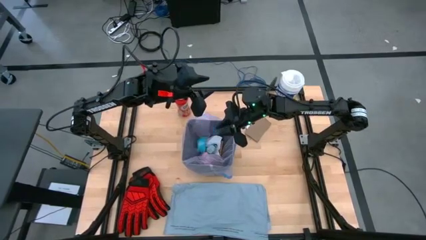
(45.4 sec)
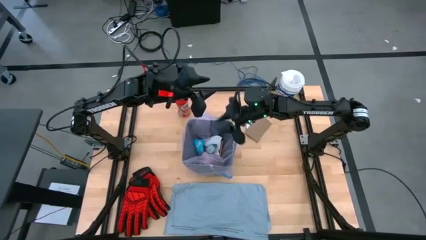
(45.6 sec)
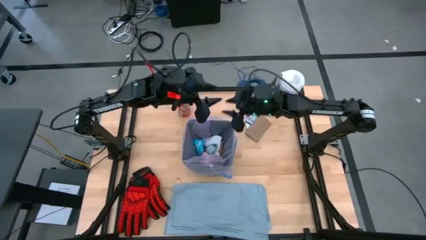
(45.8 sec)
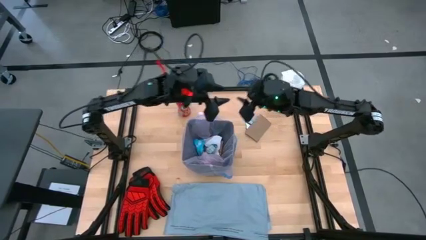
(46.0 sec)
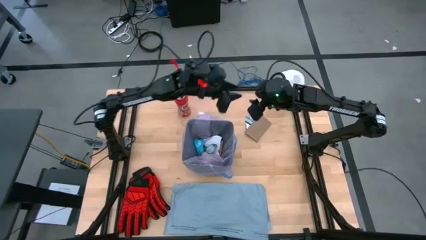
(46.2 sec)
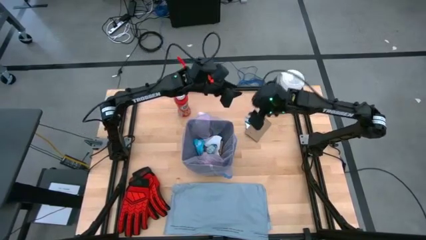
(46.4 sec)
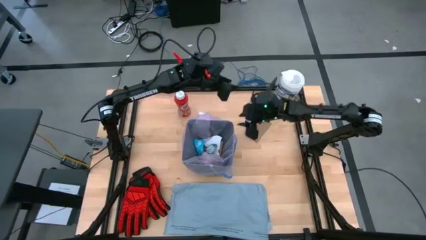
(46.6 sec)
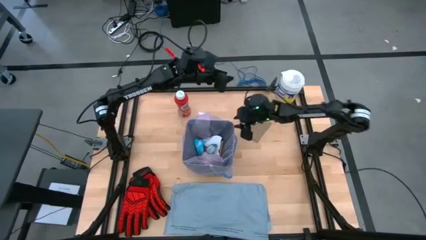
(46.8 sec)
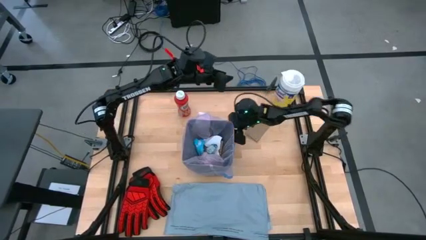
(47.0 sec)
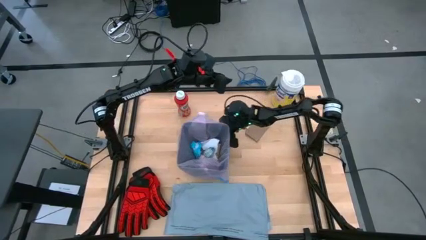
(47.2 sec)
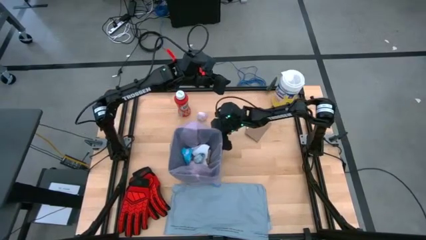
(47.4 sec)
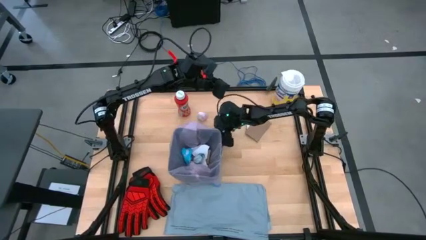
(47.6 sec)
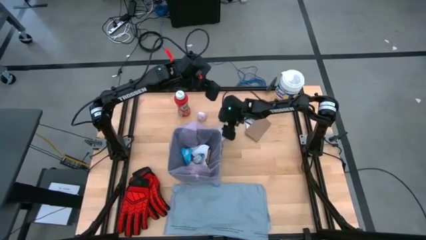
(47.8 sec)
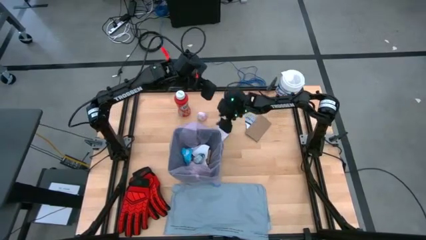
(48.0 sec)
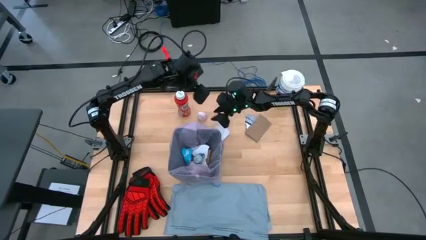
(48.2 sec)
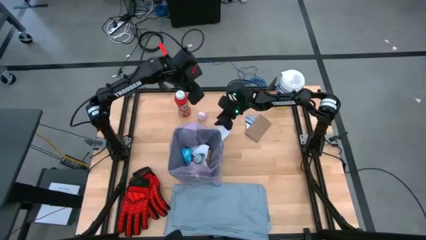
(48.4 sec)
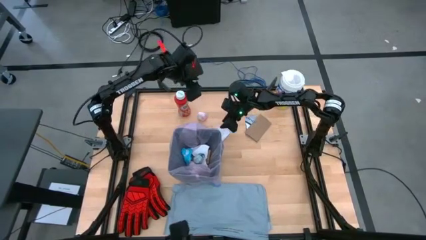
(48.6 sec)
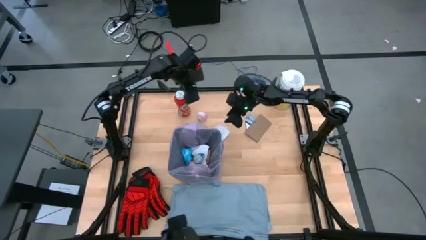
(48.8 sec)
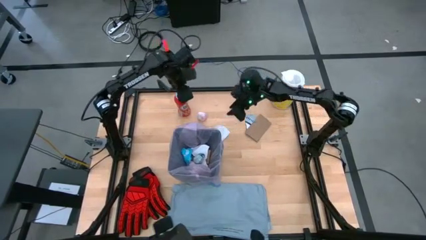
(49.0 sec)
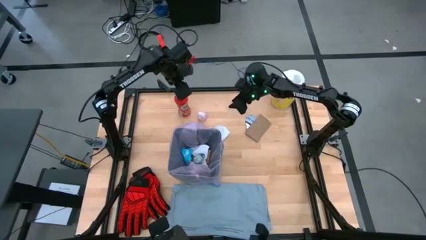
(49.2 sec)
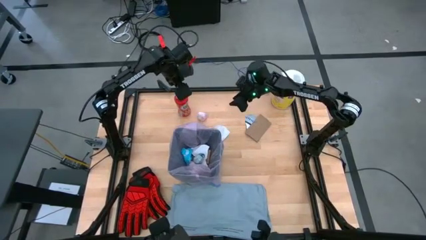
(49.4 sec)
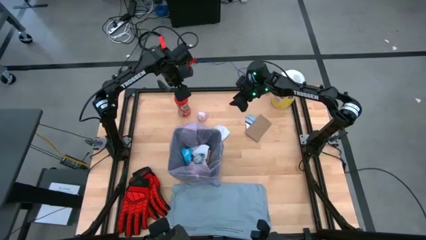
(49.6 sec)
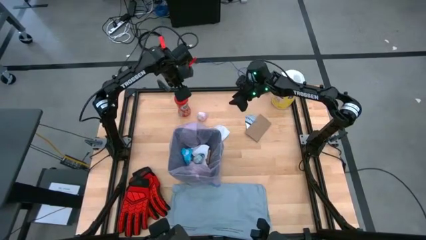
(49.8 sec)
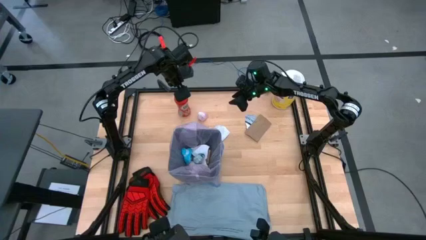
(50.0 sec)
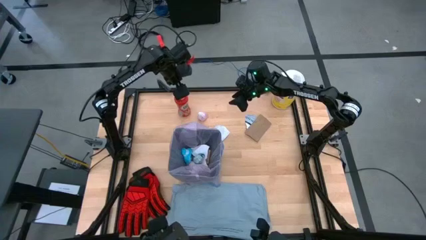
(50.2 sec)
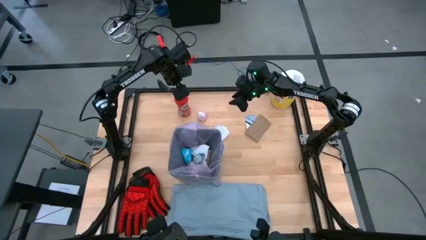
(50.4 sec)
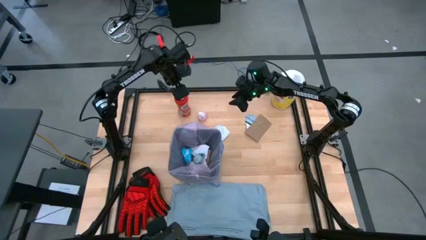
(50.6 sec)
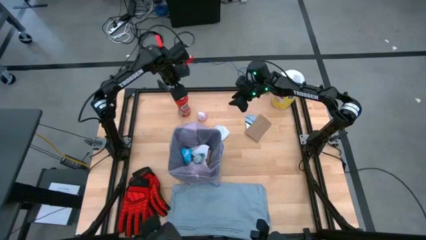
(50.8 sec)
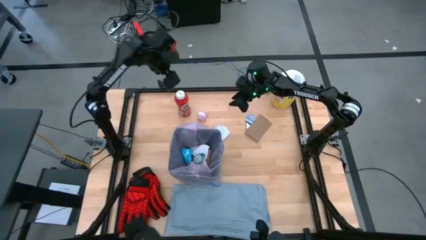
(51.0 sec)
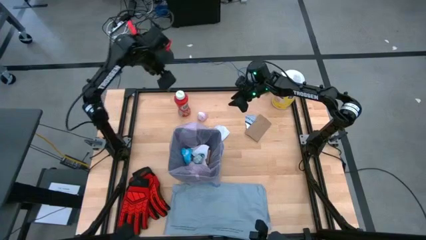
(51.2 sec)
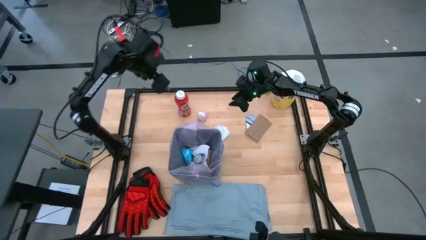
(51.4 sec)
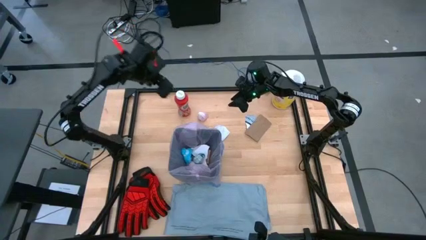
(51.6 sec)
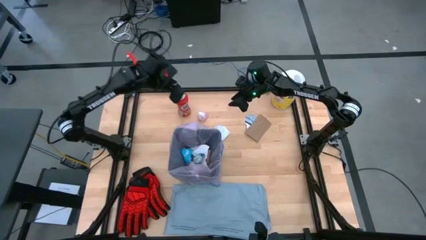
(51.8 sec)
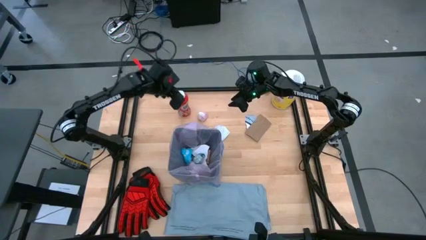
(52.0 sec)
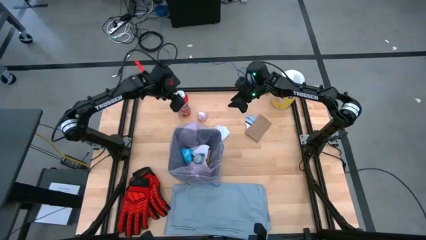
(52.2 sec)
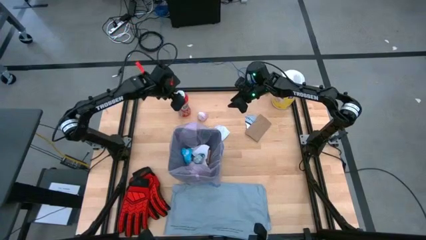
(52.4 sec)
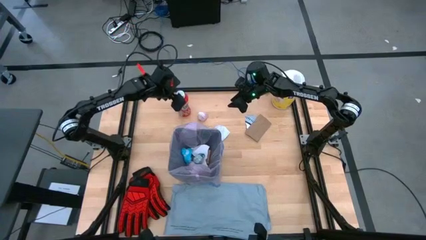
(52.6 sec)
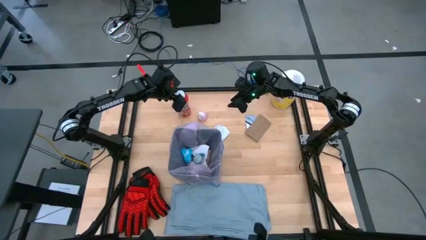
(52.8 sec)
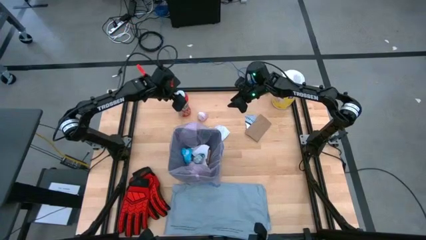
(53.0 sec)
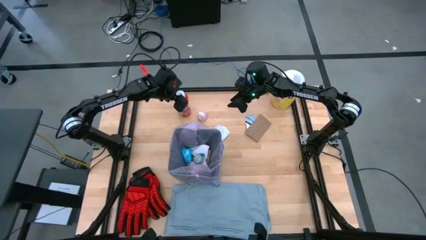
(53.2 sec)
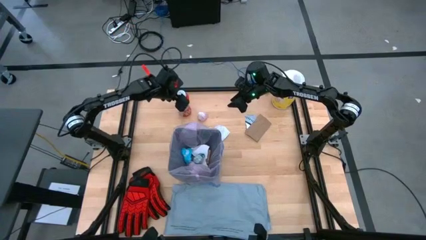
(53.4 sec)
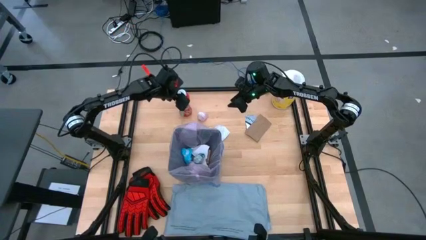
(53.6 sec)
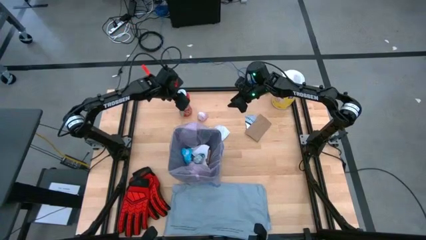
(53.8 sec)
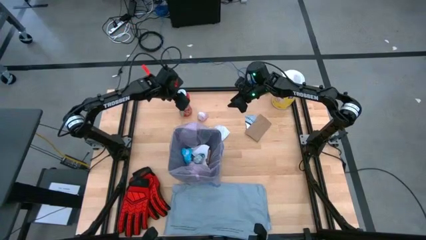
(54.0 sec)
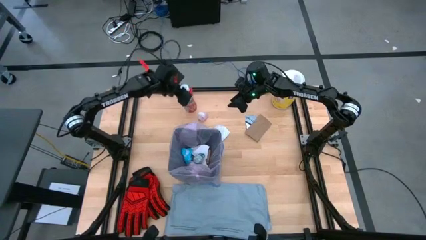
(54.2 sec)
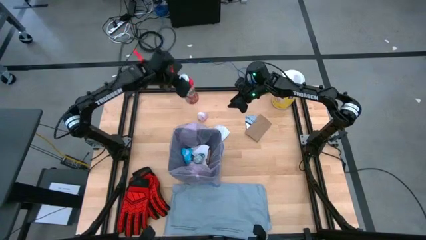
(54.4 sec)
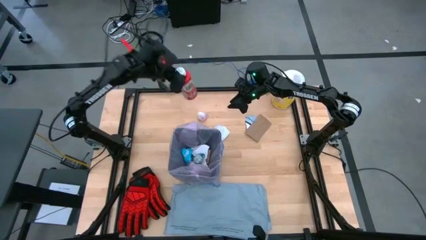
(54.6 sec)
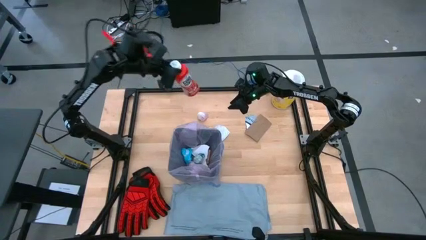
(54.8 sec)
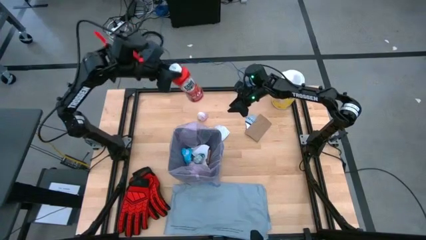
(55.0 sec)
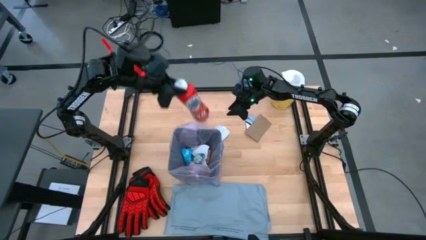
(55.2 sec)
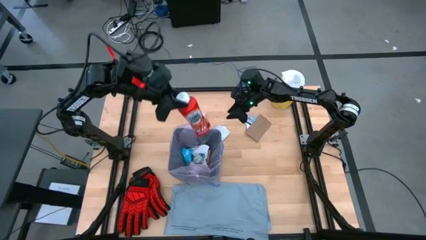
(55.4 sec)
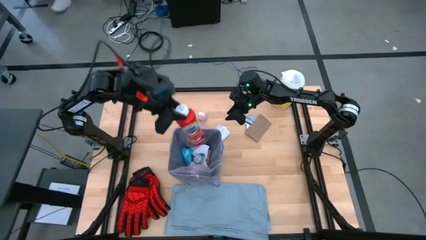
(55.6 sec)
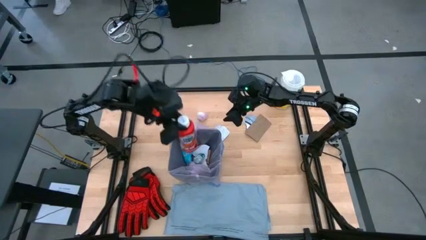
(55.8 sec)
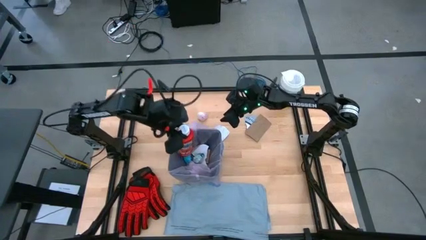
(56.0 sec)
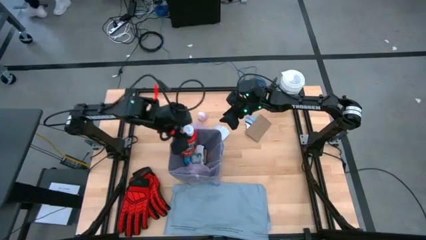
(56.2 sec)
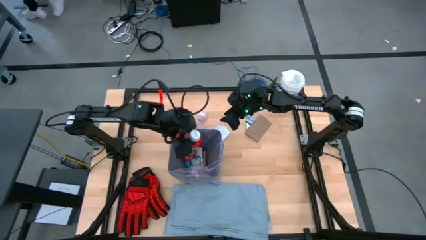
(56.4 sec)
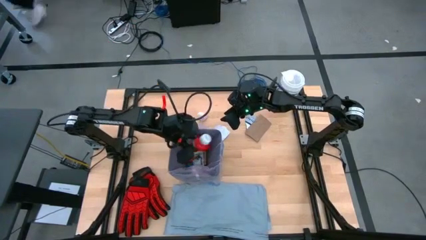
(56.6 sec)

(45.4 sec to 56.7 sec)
Task: place trash/remove bag and relplace
Put the red bottle into the trash bin

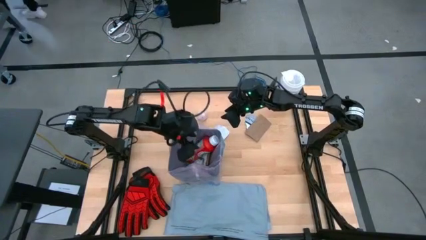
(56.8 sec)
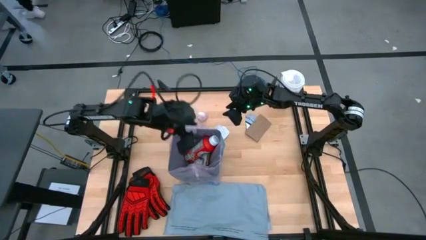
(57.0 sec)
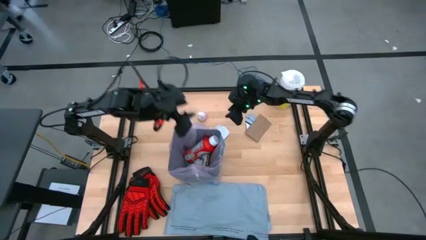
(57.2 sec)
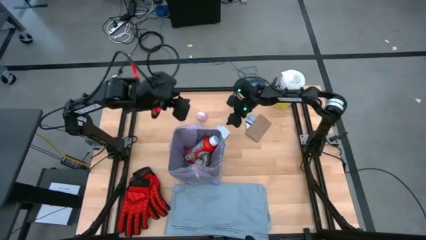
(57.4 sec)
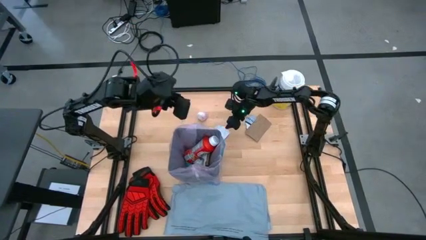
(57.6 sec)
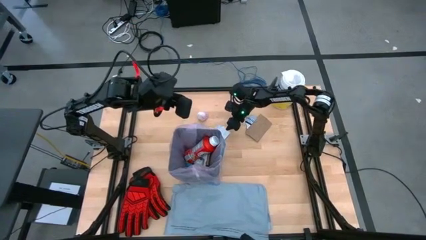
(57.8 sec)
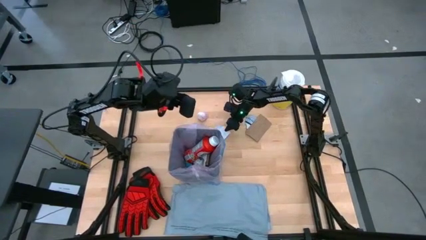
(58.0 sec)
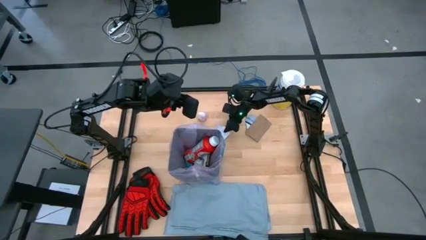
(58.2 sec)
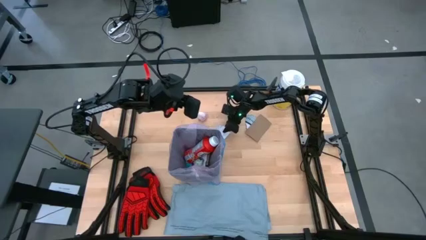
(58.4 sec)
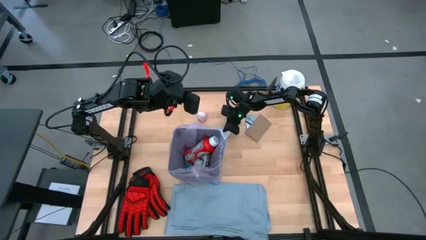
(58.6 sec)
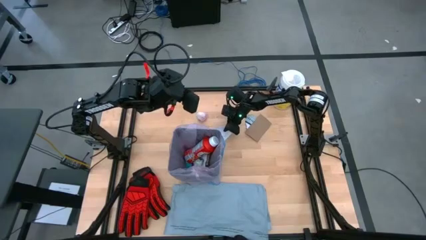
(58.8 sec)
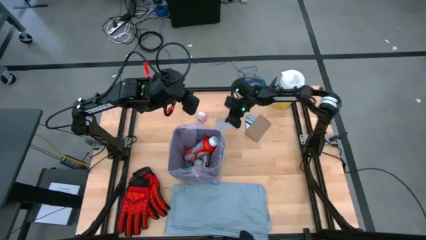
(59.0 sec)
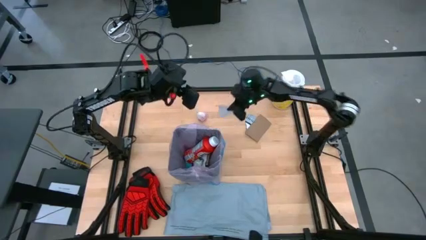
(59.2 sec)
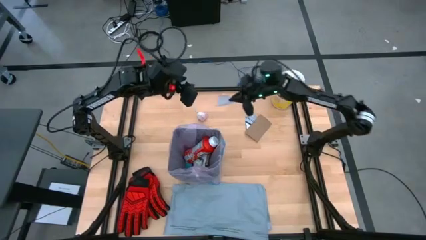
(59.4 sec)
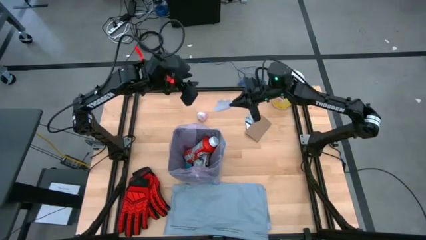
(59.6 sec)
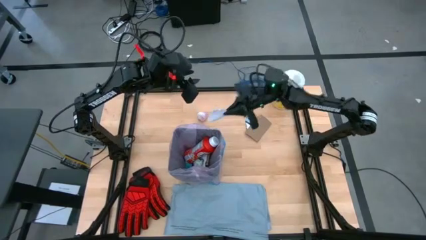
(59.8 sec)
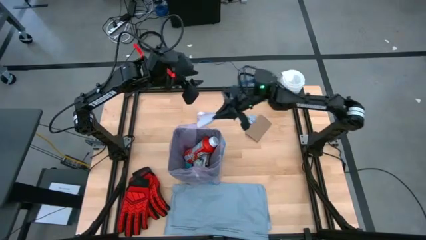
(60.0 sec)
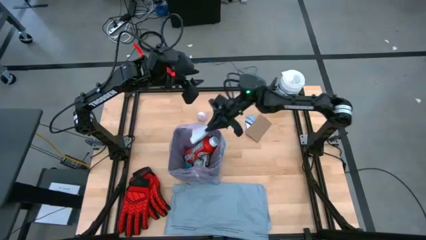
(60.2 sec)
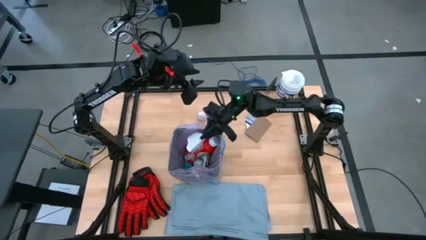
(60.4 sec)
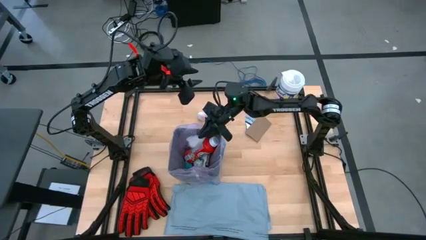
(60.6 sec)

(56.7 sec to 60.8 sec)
Put the white paper material into the trash bin
